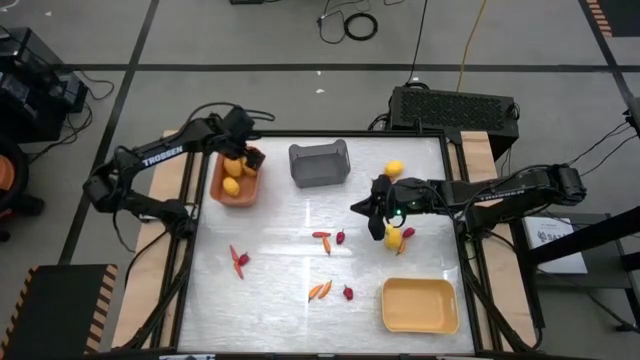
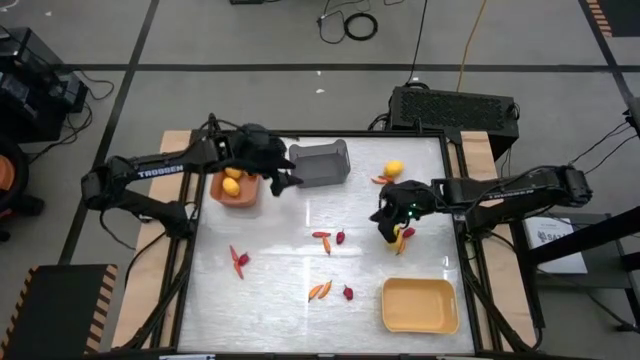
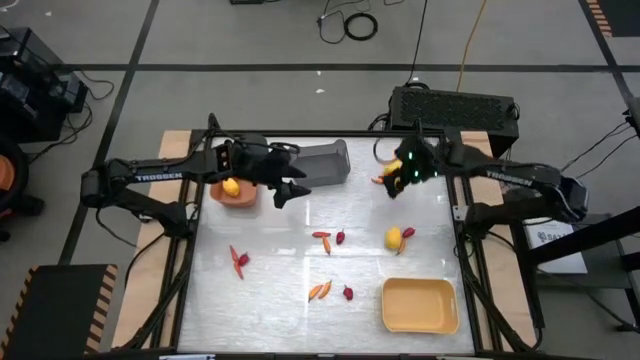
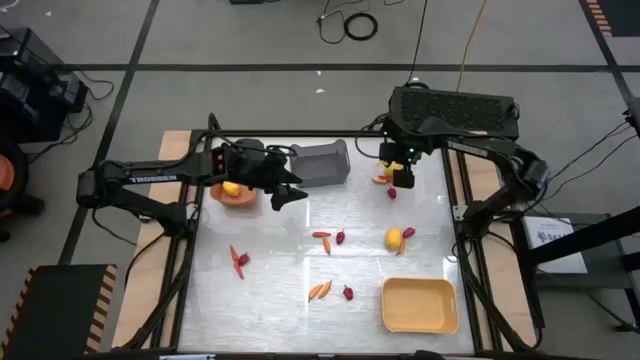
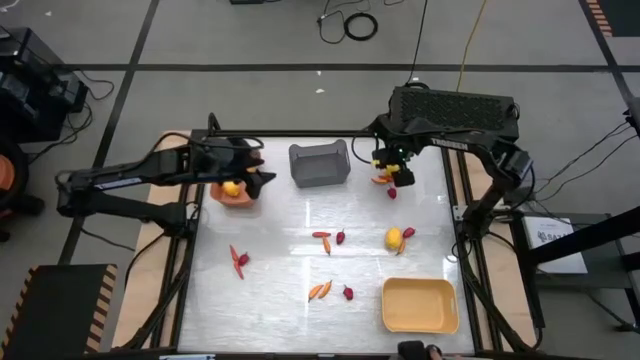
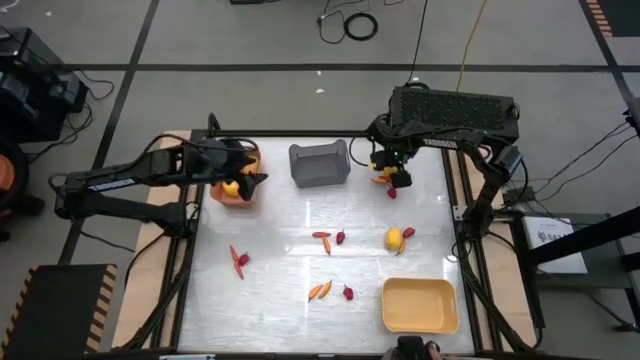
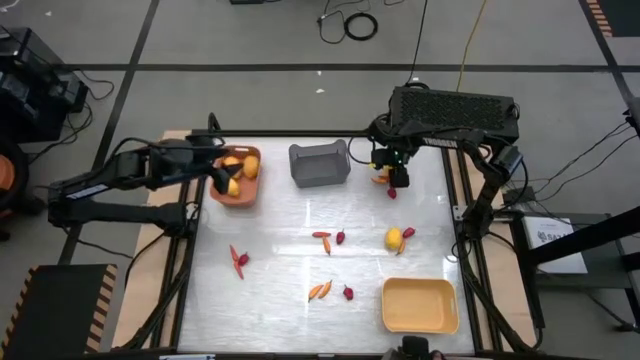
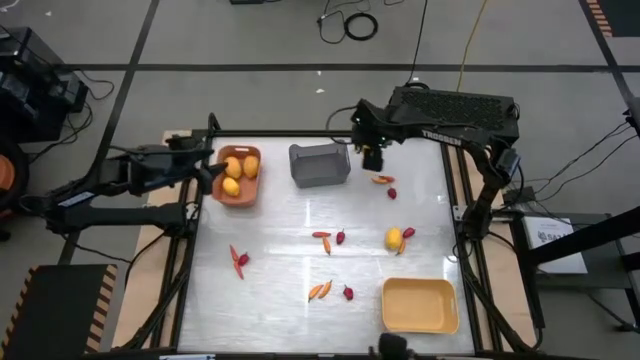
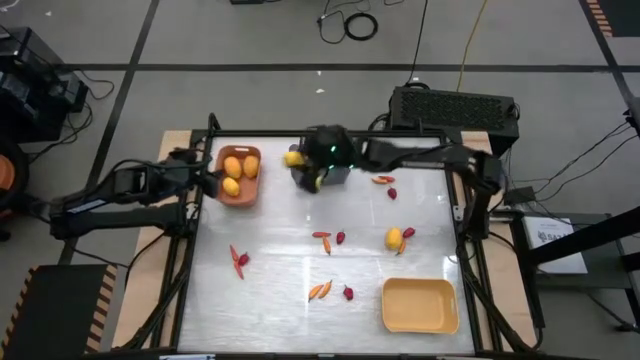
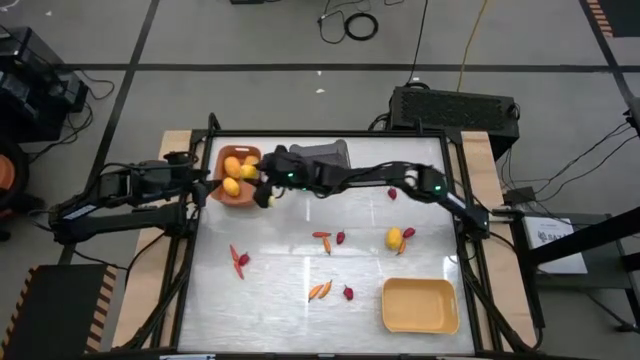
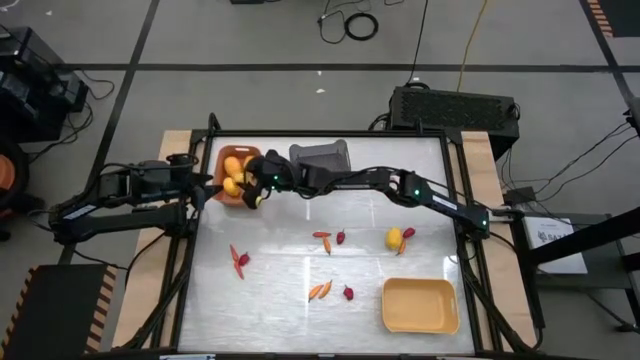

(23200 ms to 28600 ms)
Task: Sort produce into baskets
Put the lemon into the orange bin

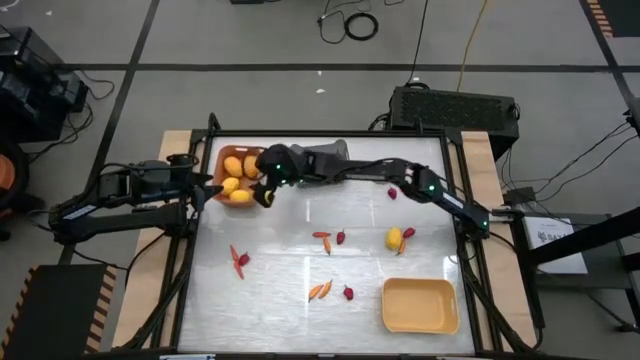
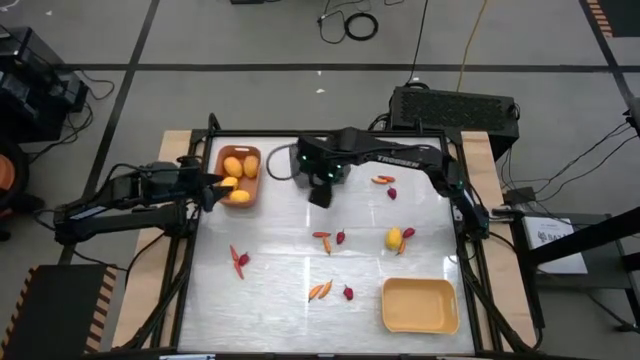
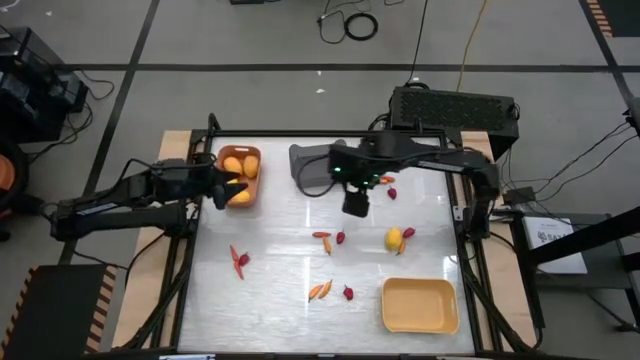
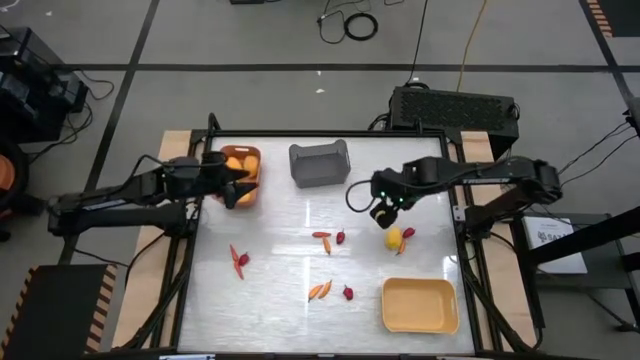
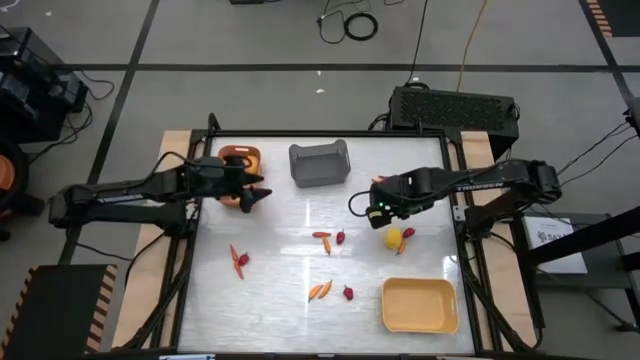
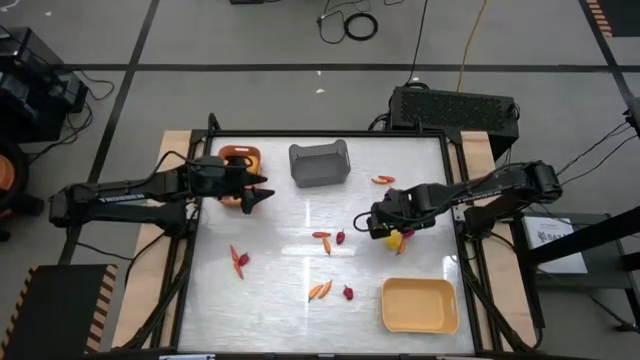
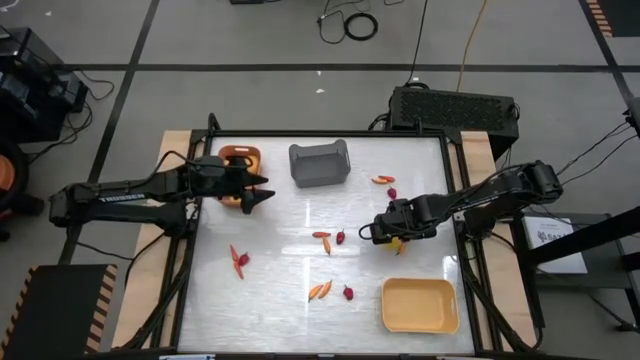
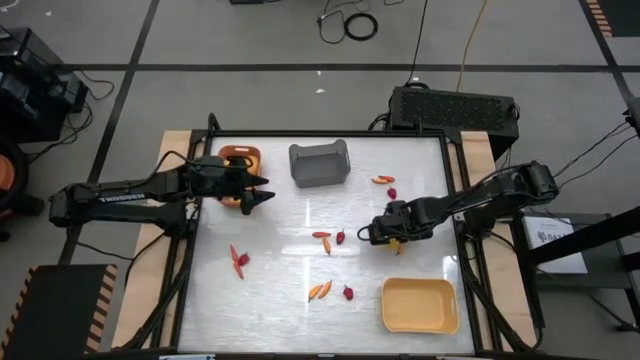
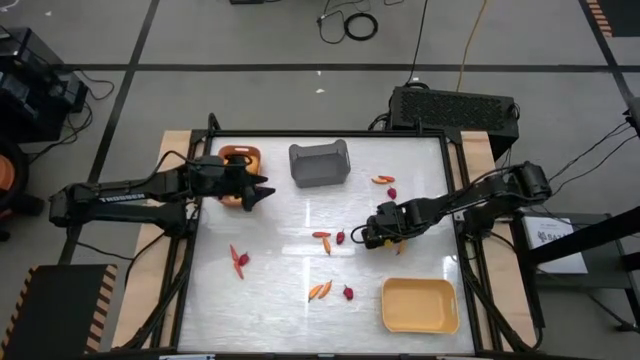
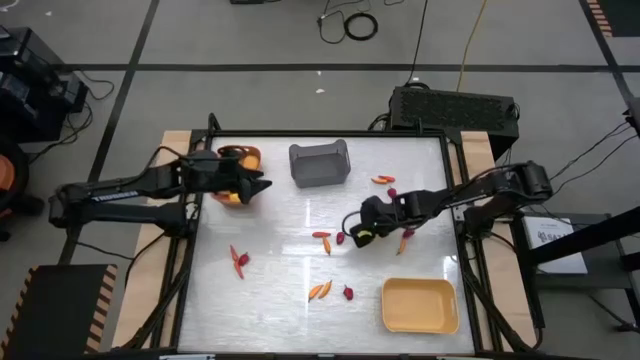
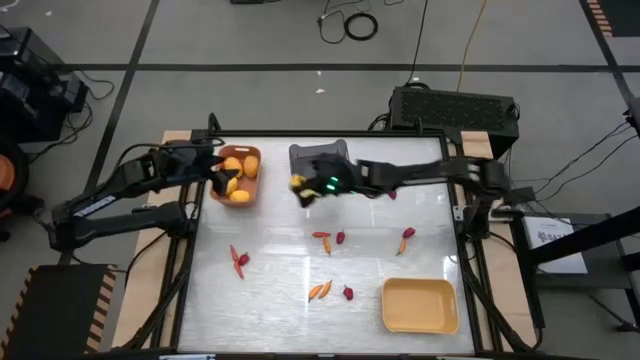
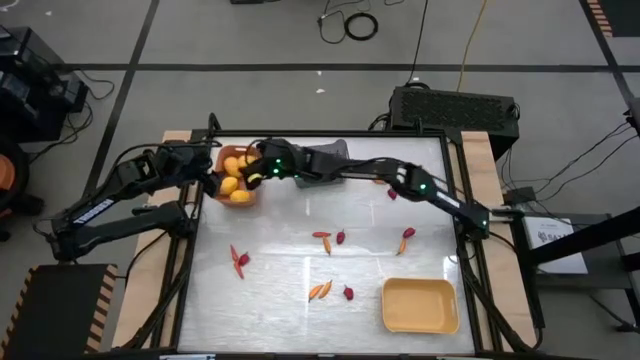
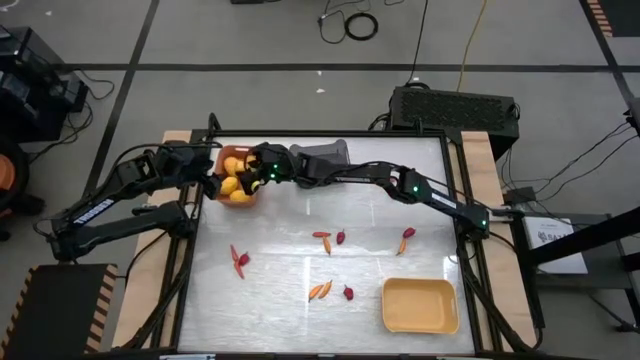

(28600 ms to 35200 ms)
Put the lemon into the orange bin

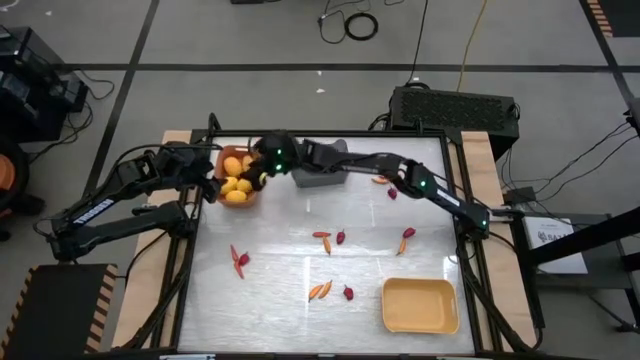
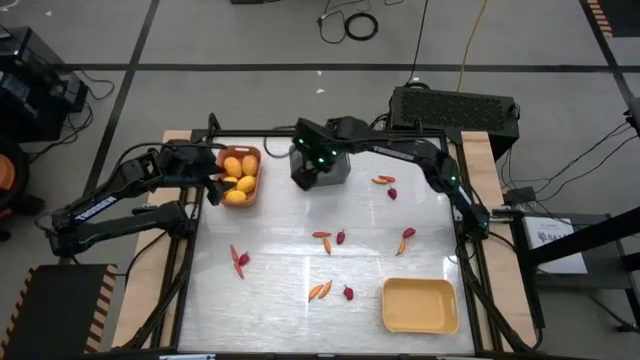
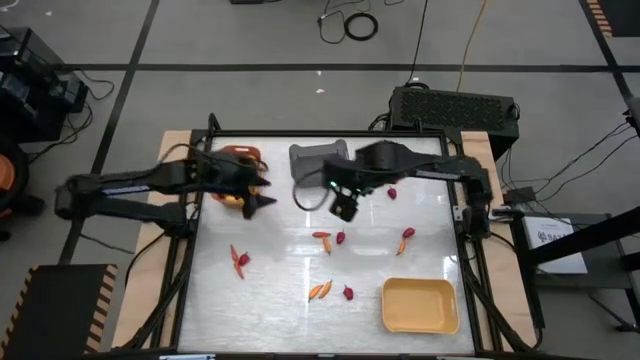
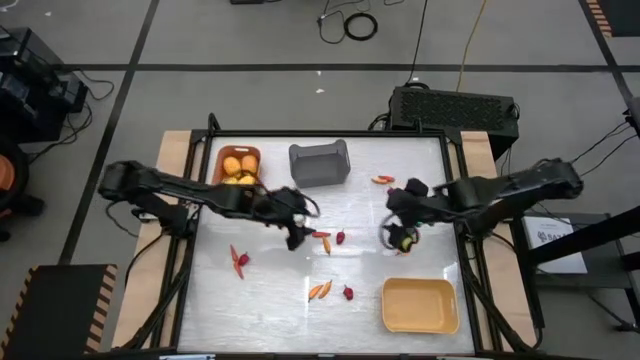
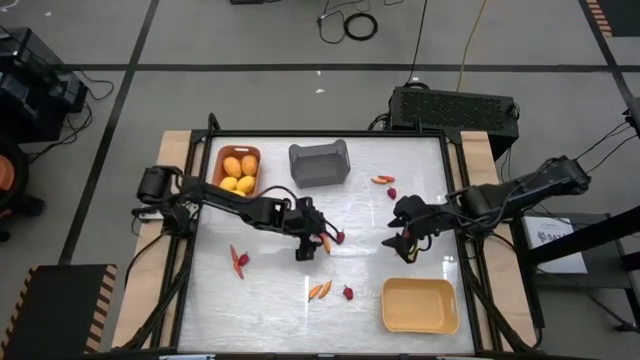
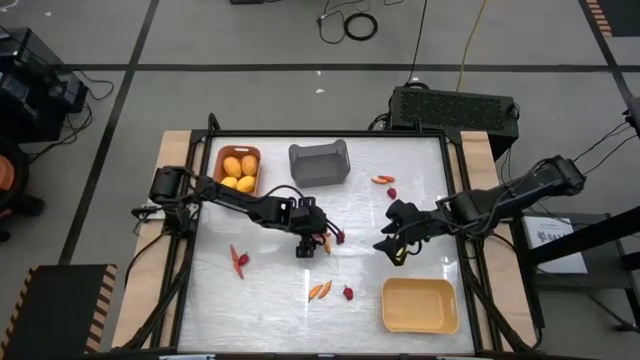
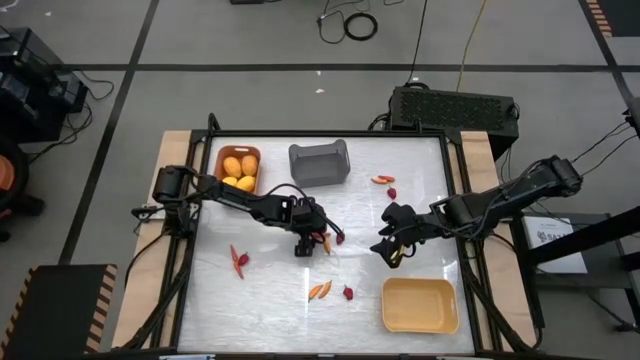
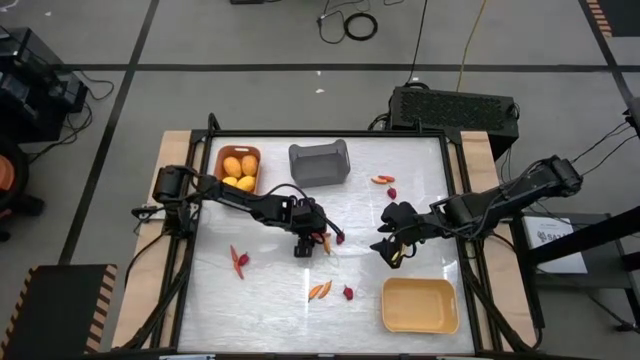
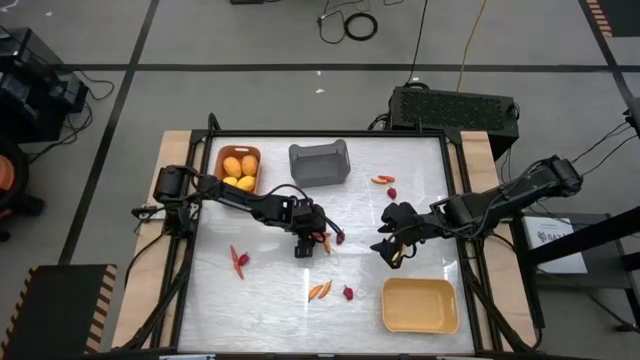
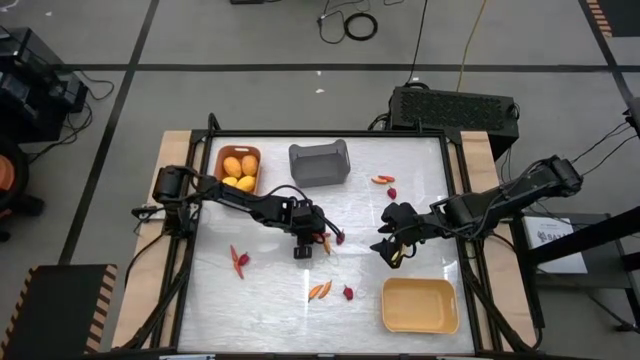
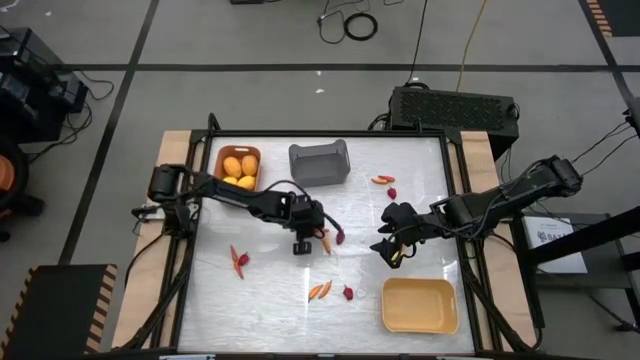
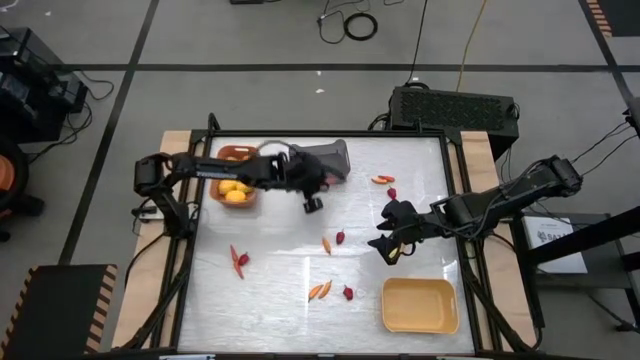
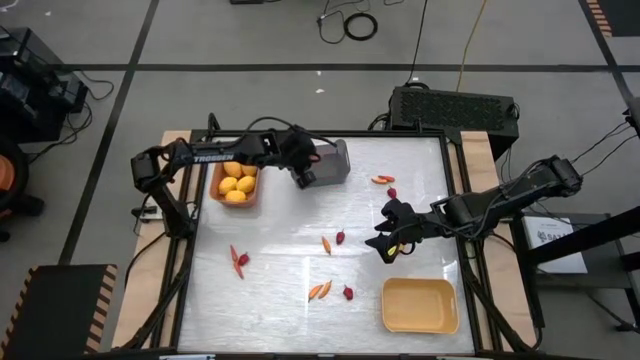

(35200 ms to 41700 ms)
Put the orange chili pepper into the black bin

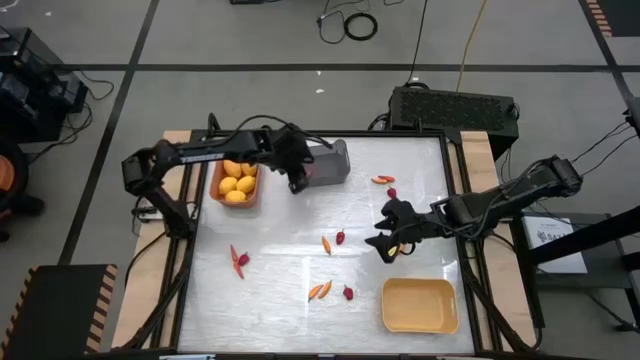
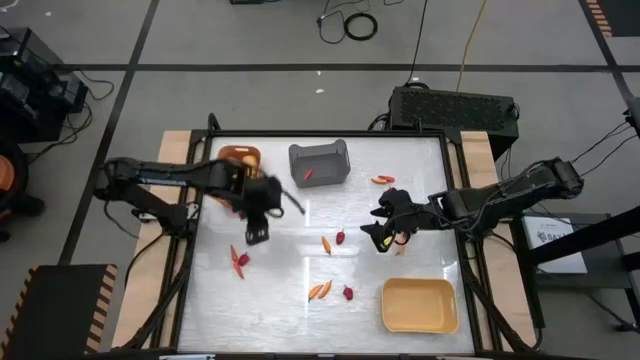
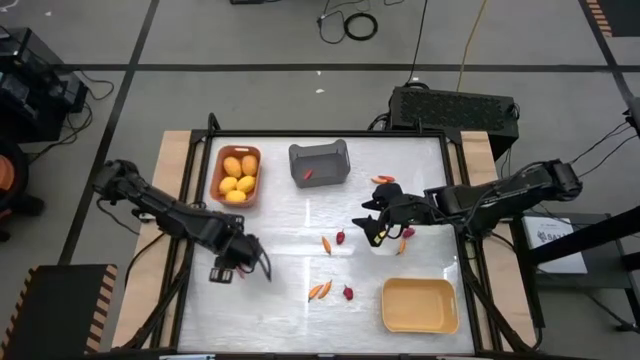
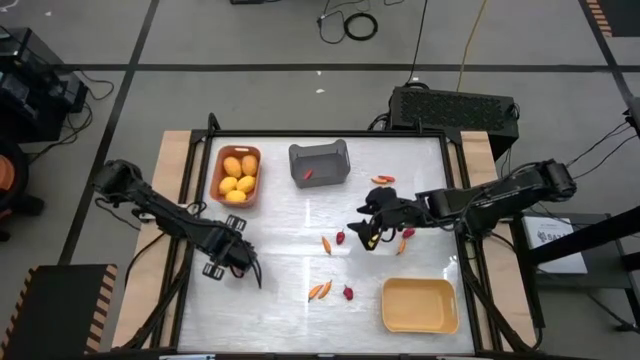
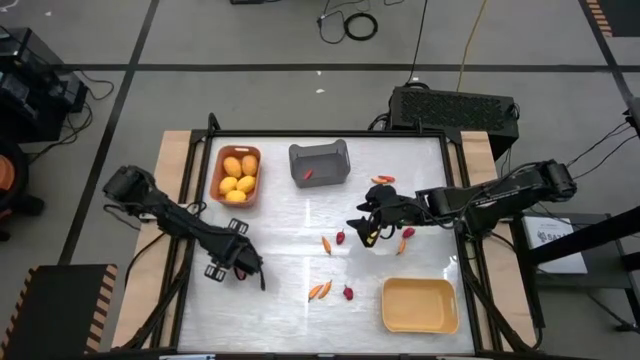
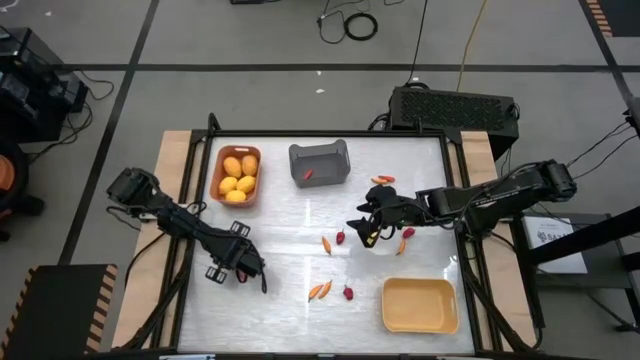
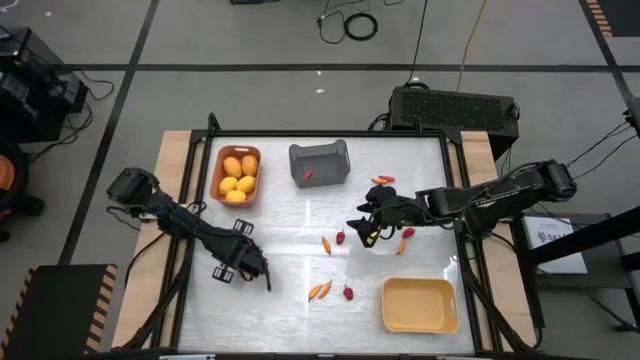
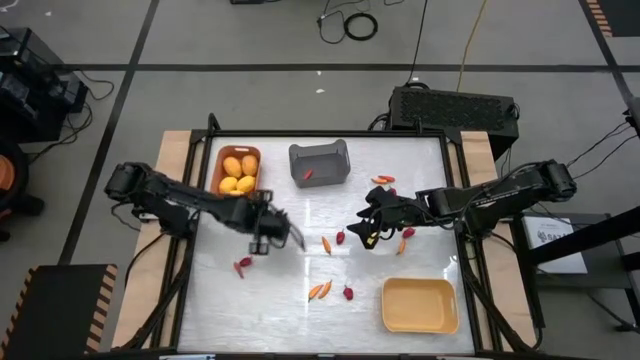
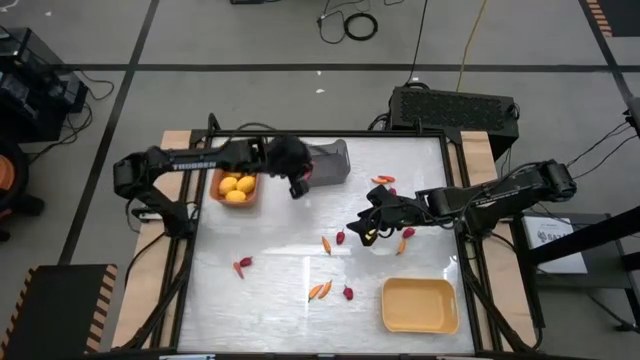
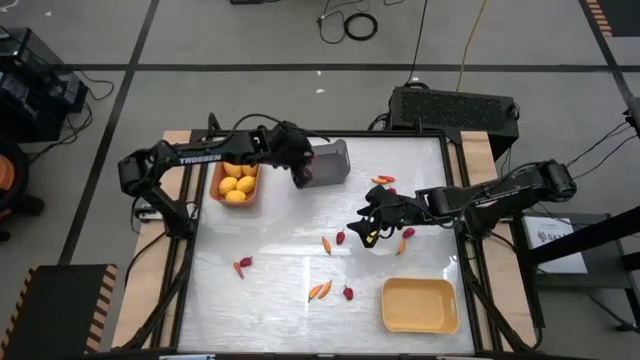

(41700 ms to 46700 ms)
Put the orange chili pepper into the black bin
